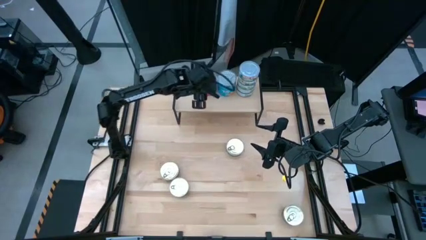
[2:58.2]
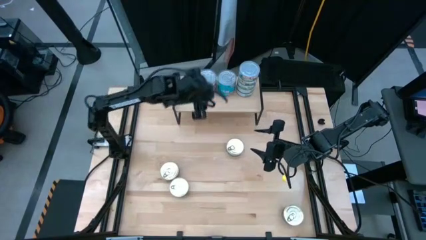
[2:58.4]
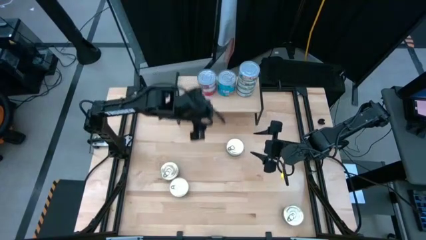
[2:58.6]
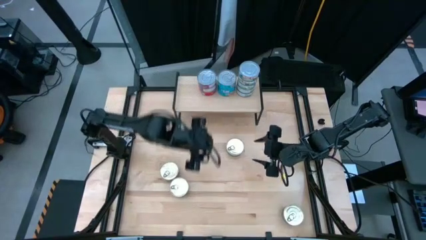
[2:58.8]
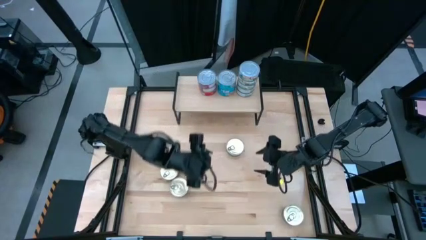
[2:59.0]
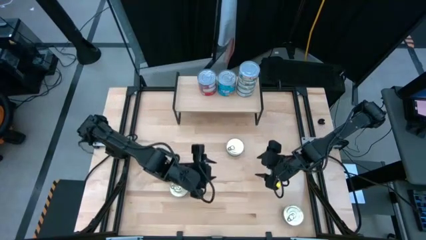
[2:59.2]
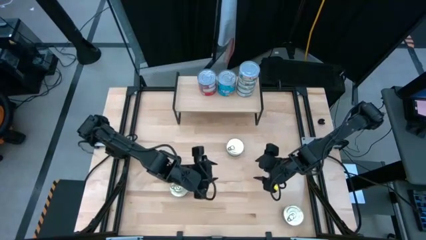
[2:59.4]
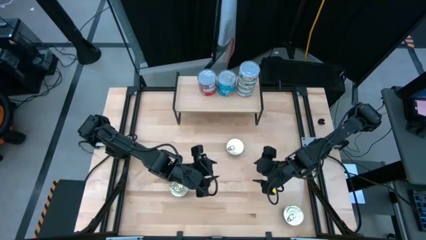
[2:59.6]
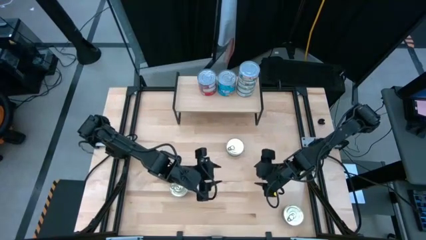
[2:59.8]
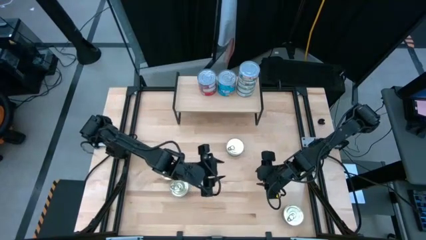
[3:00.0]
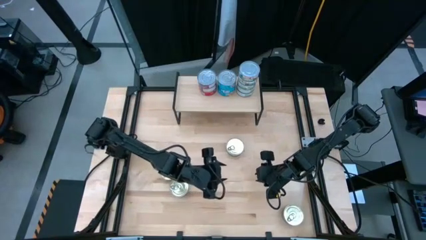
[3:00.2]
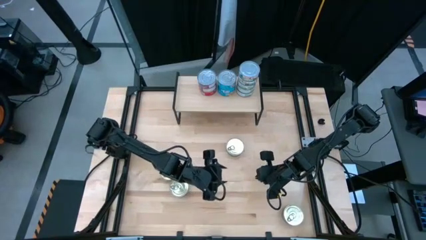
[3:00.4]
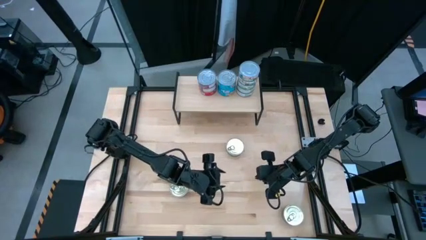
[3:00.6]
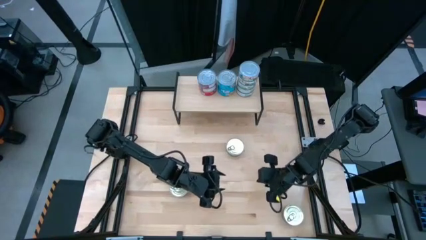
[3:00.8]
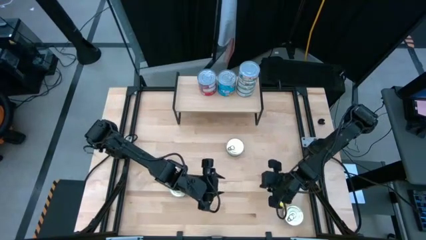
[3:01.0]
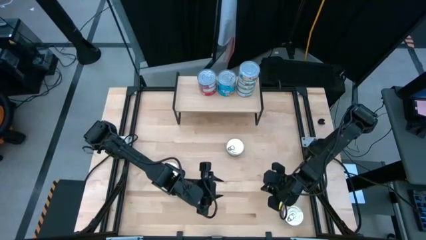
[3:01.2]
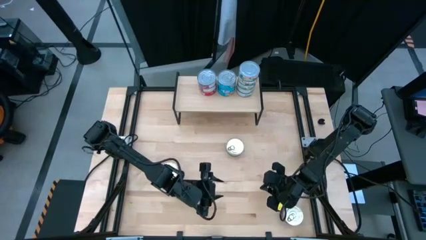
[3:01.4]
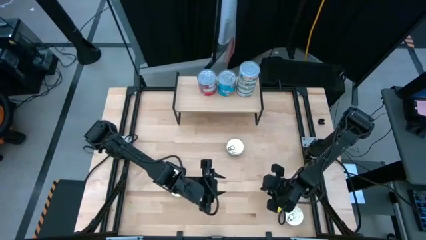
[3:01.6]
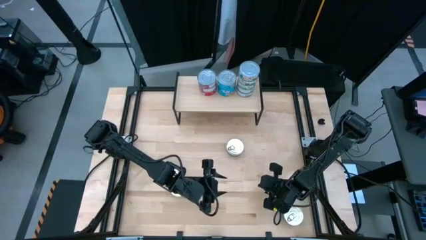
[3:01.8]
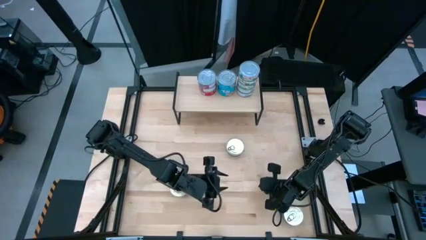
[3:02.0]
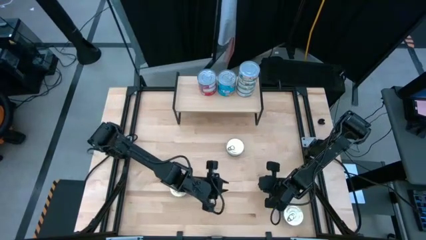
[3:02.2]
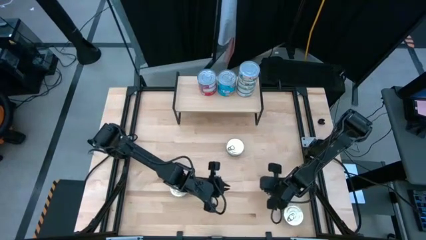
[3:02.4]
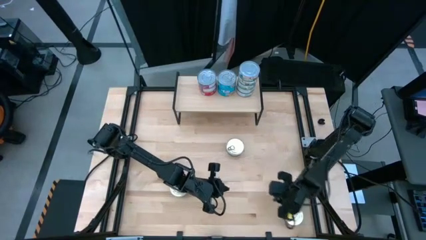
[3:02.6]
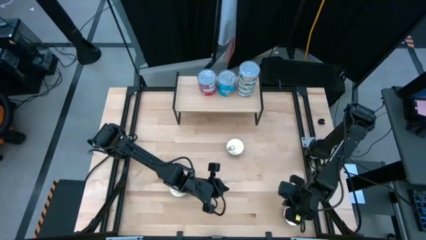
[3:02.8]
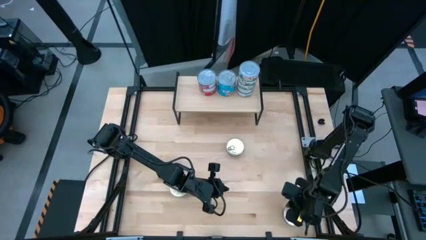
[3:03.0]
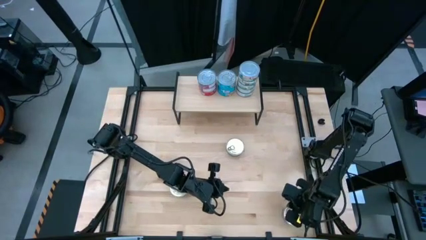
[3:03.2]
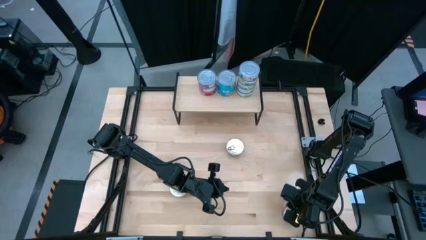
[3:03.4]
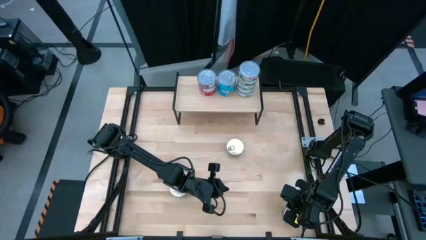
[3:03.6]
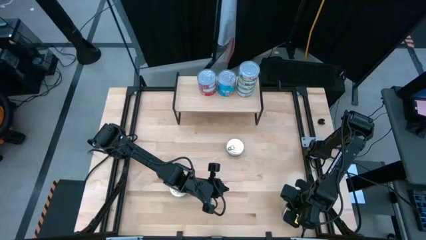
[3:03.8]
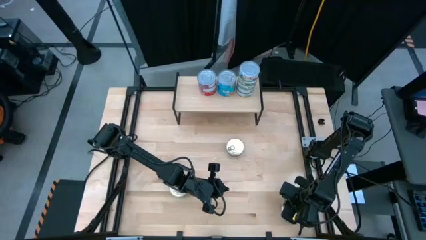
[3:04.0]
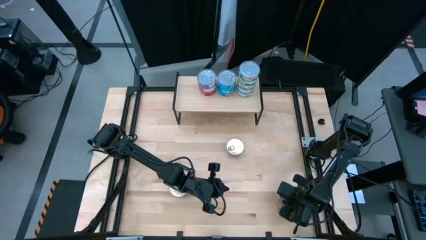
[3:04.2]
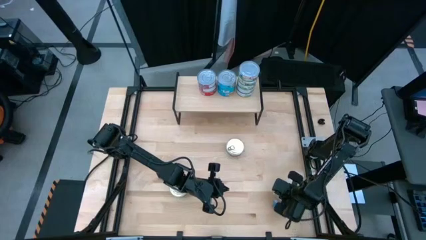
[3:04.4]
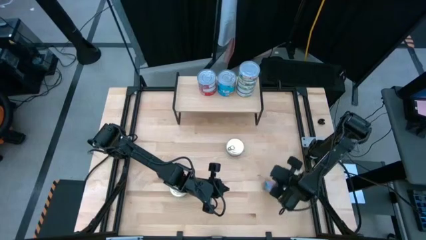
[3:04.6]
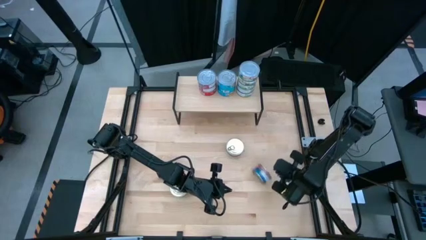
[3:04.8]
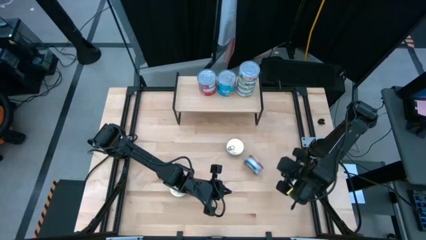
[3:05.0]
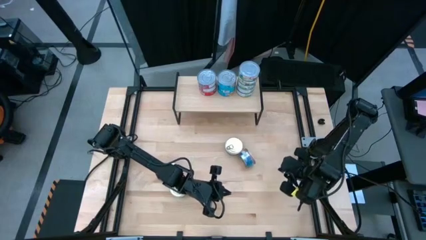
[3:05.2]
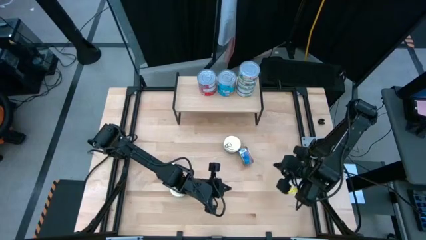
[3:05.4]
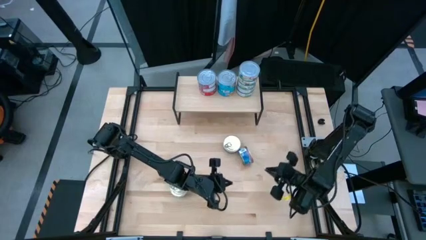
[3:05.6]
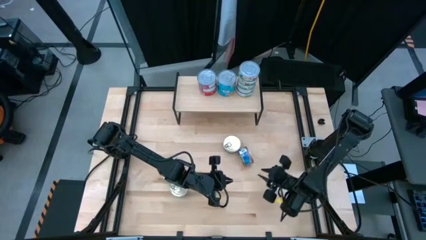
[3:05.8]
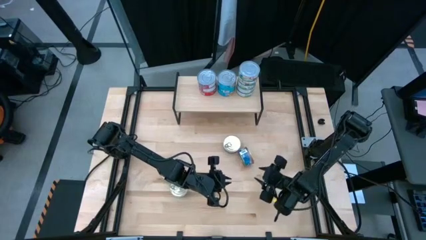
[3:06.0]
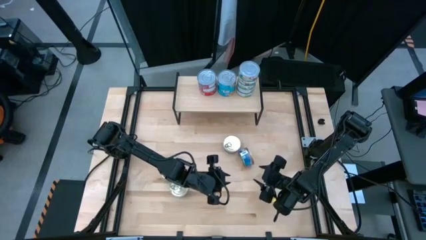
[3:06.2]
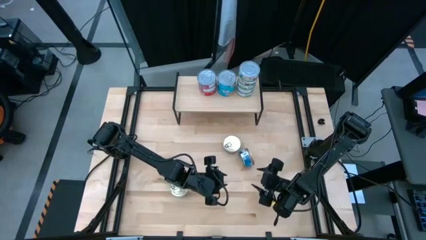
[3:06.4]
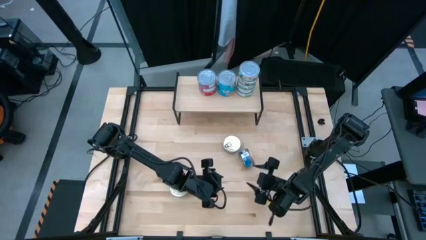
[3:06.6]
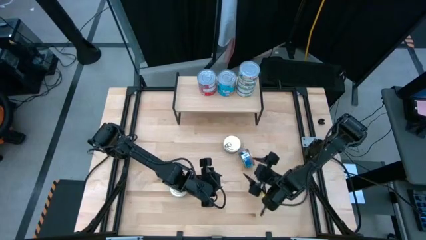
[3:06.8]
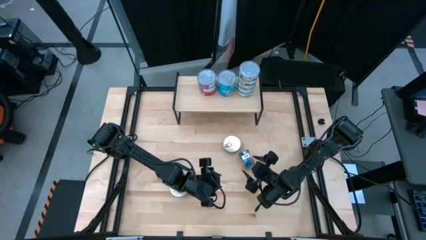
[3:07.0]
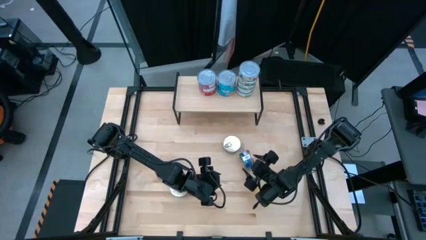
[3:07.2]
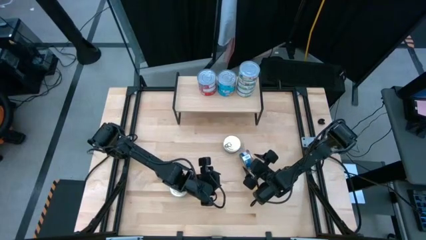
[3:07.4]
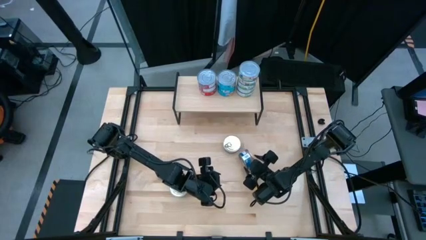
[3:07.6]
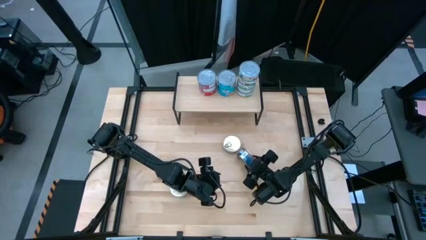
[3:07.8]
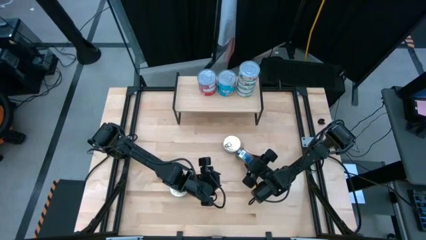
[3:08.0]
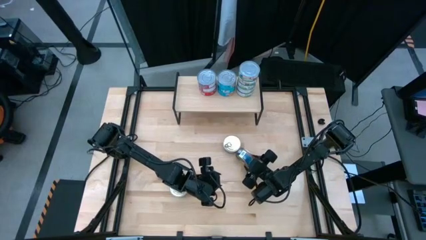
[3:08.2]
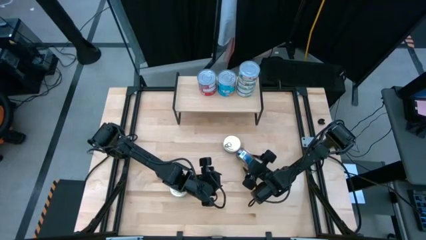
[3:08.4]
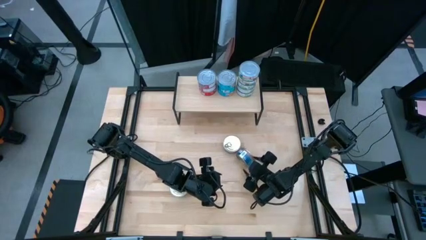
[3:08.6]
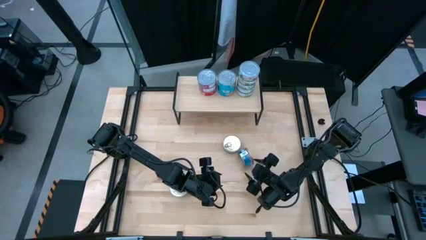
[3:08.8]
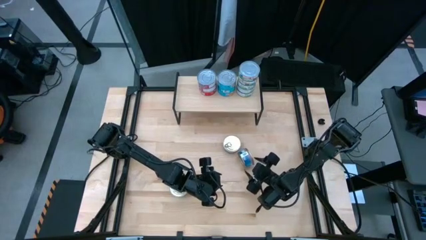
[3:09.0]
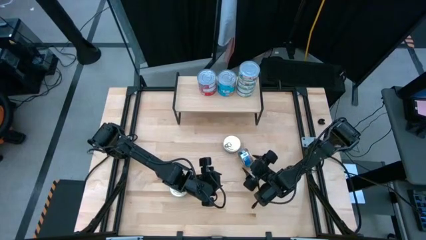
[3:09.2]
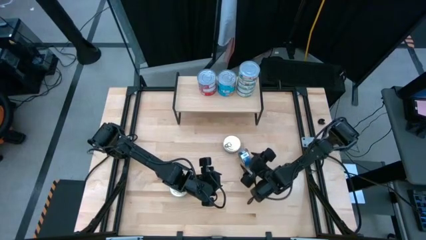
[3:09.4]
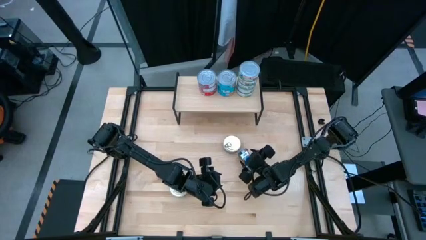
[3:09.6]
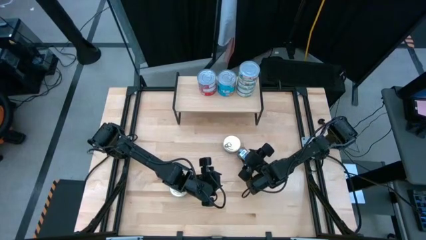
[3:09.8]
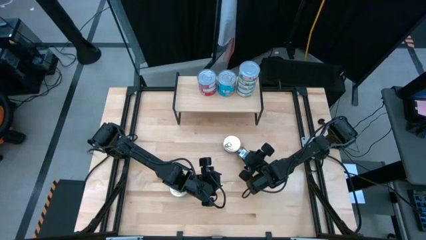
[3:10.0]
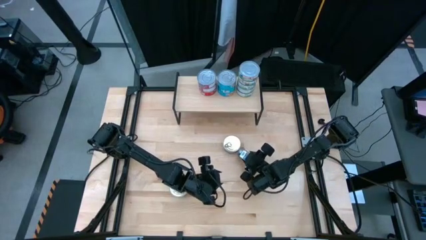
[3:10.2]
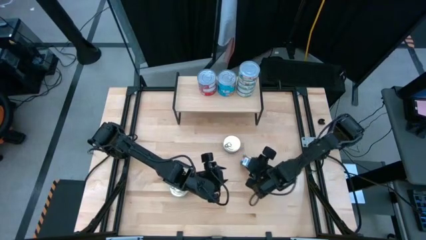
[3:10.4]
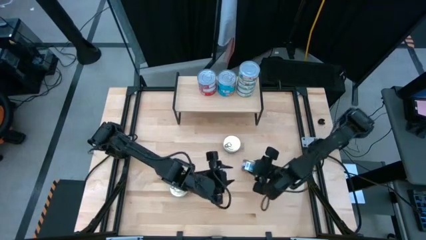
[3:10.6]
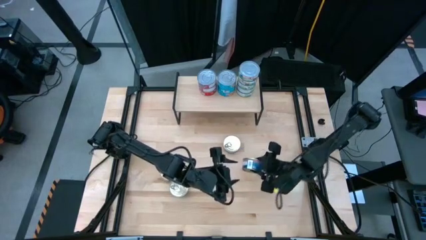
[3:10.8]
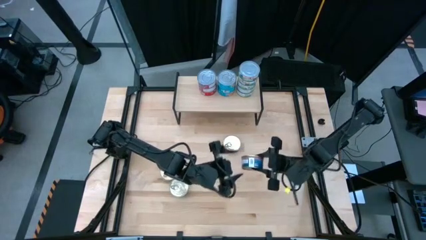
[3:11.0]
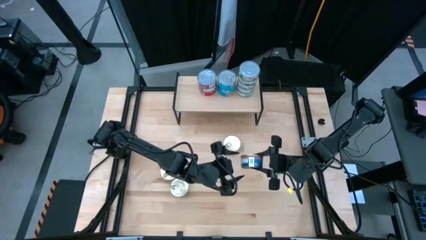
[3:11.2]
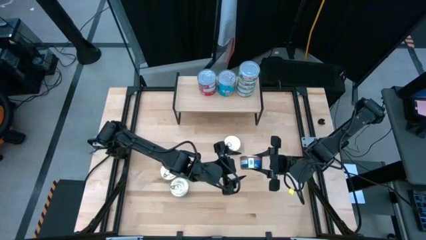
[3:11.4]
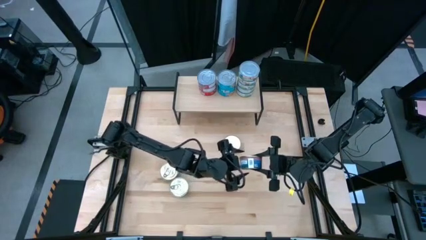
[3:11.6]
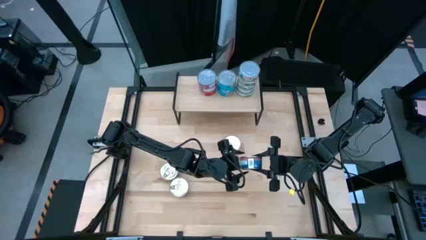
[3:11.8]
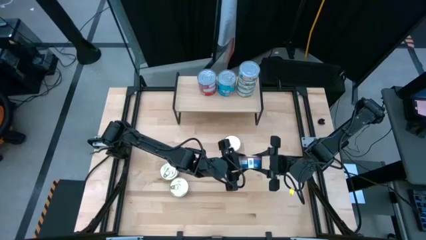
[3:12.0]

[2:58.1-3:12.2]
Task: Stack canned seafood by type on shelf
Put the blue pink tuna can on the shelf
